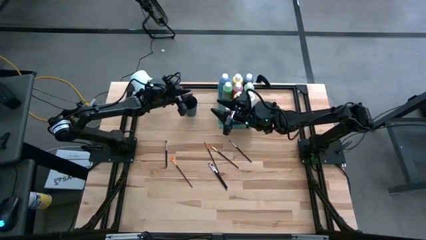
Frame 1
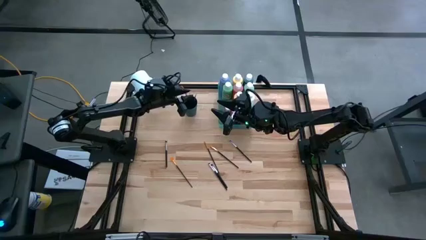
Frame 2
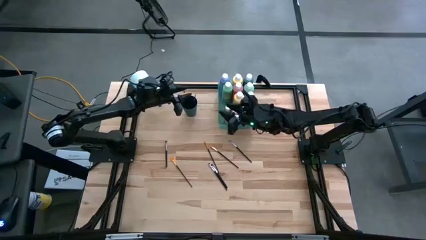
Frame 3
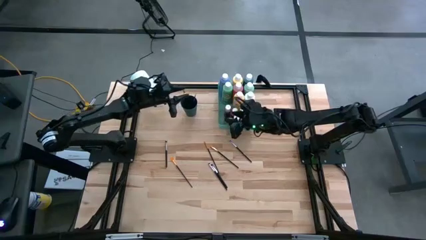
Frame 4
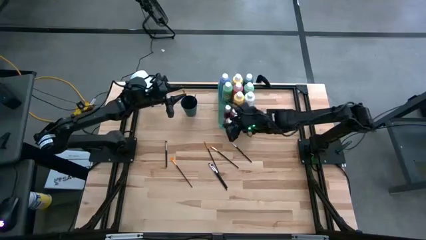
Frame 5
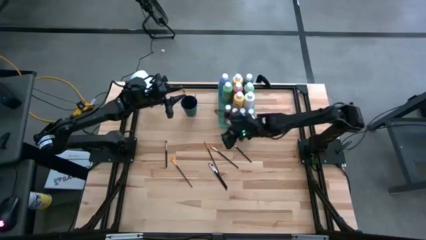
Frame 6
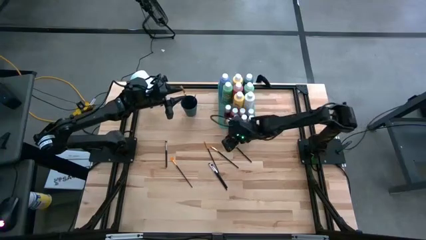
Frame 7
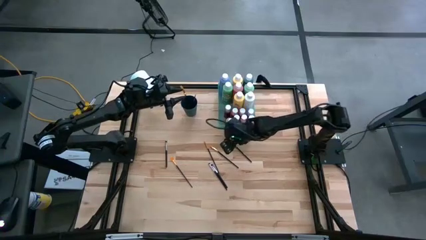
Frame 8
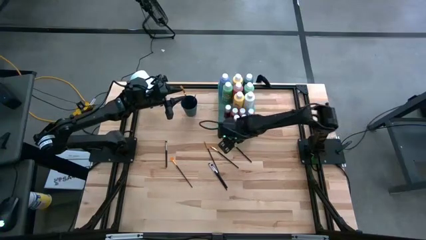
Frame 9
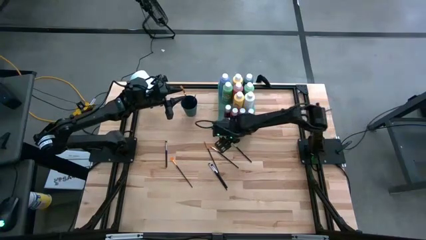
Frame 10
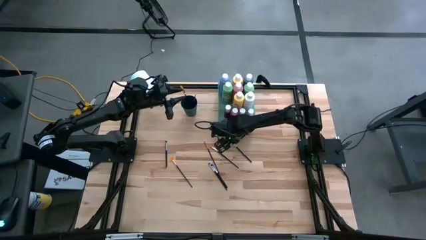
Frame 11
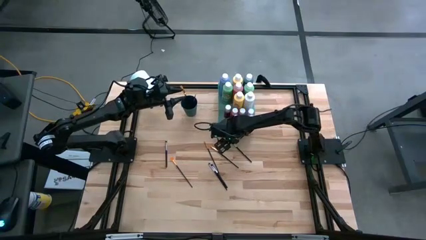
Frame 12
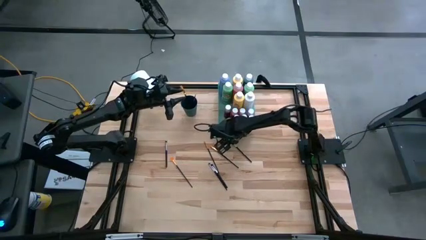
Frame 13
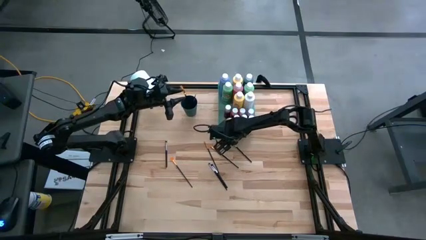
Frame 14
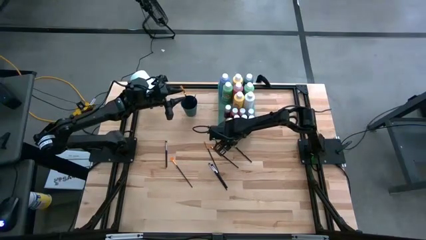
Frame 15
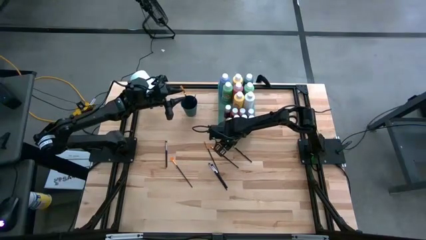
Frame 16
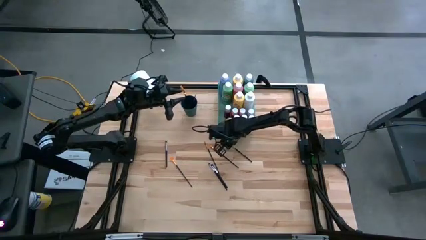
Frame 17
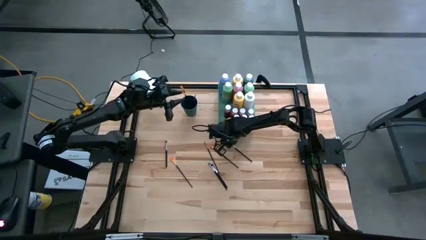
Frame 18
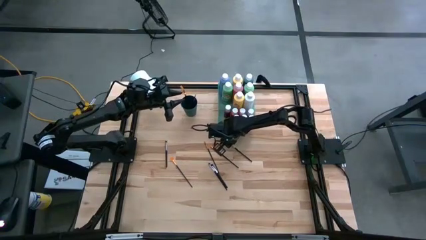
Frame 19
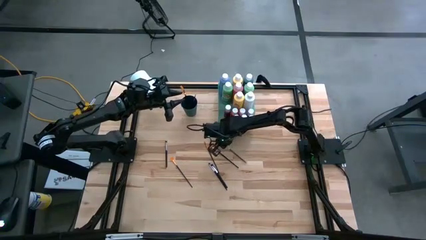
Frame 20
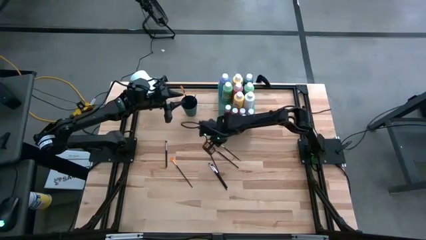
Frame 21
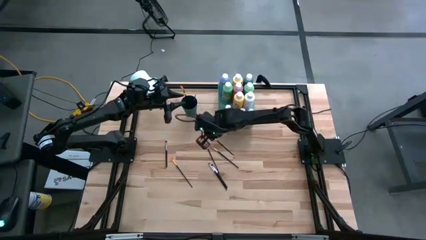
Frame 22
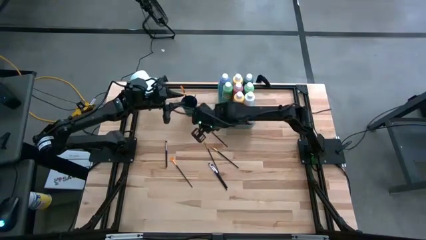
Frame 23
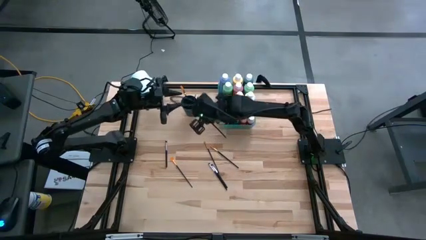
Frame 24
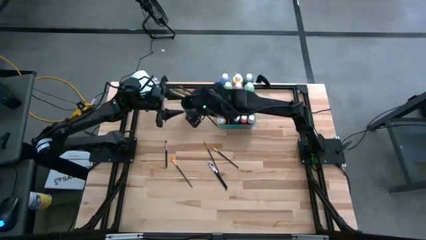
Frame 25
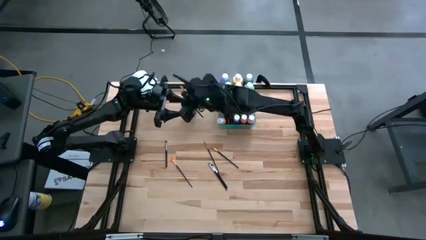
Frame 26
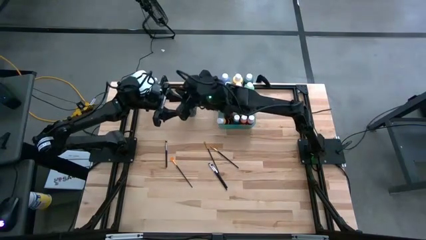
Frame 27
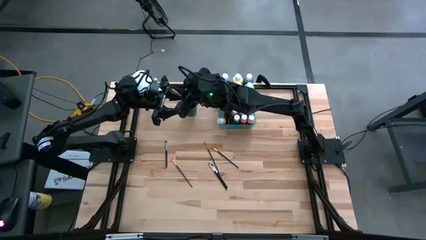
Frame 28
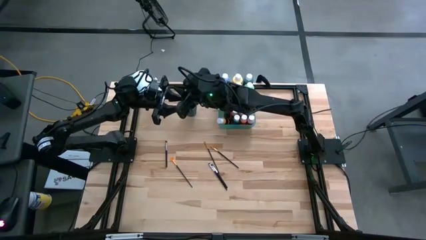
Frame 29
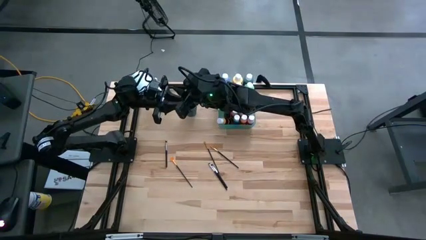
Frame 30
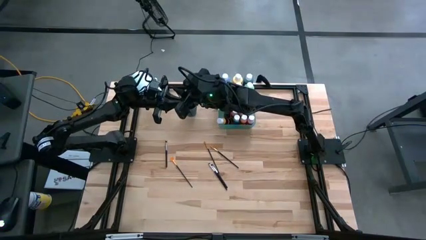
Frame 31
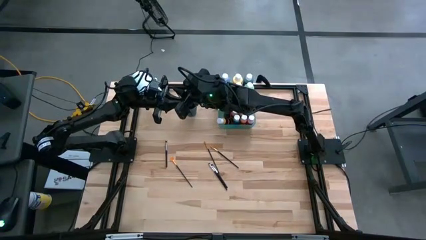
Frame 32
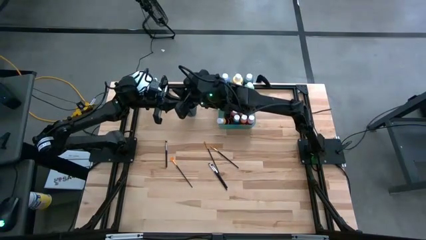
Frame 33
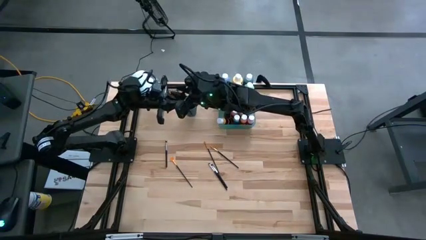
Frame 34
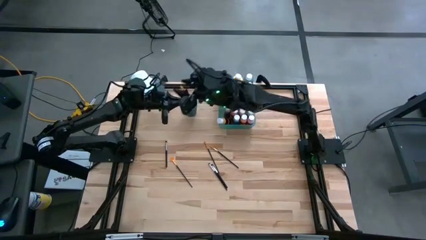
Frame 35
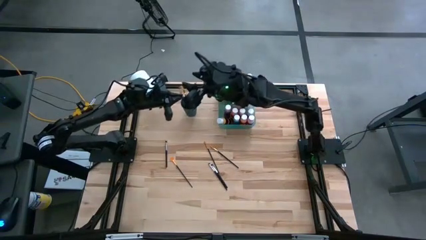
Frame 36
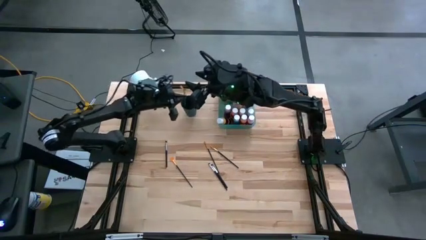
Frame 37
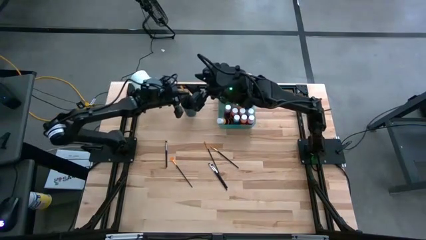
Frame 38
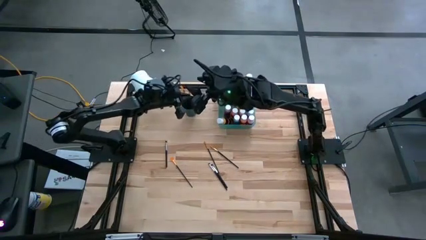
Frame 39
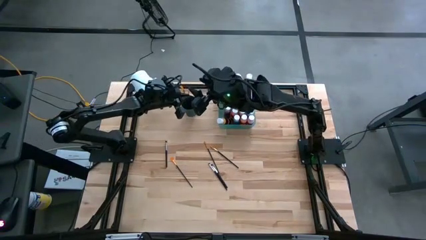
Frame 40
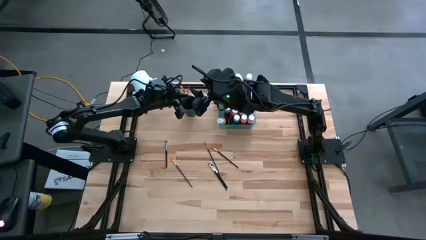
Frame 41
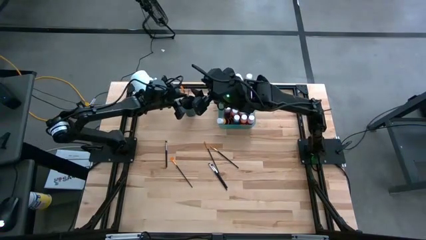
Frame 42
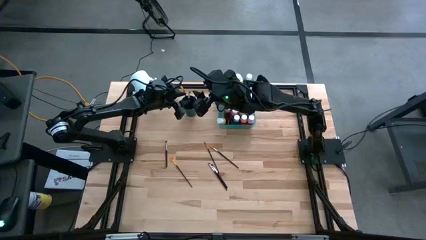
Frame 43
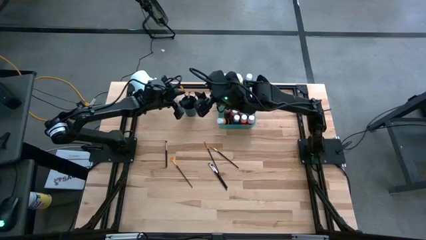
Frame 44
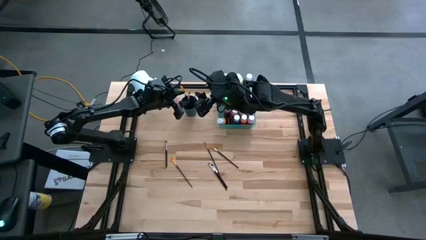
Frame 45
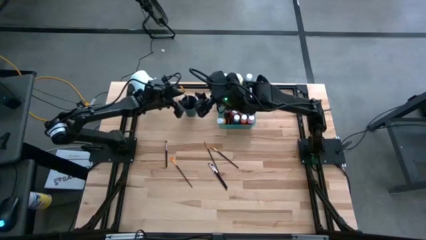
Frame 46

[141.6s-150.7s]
Task: Pick & Place Paint Supplies
Put the black silver paint brush into the black cup

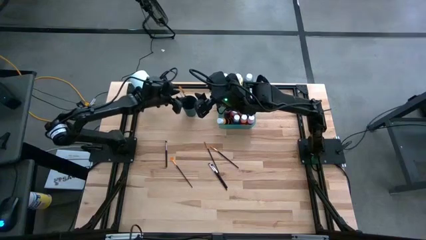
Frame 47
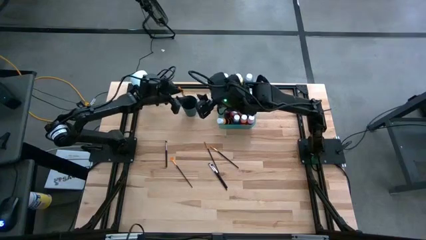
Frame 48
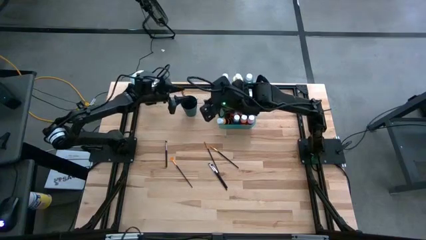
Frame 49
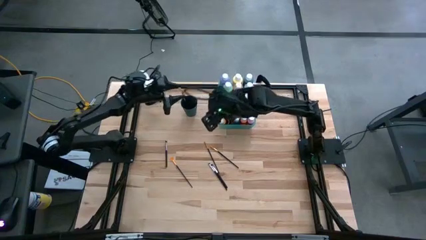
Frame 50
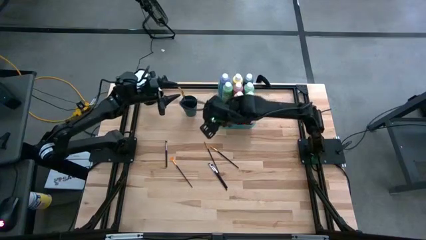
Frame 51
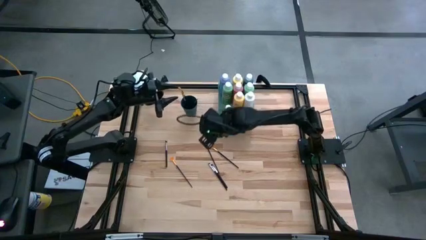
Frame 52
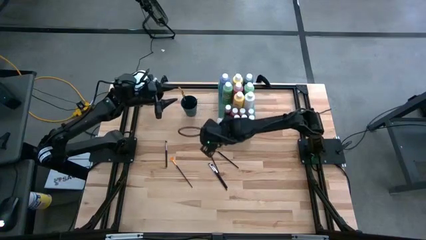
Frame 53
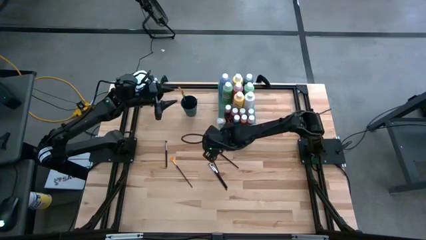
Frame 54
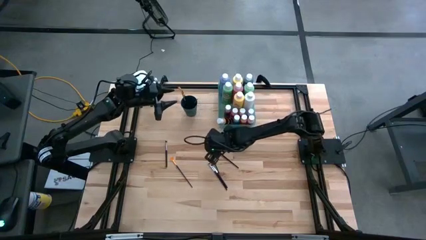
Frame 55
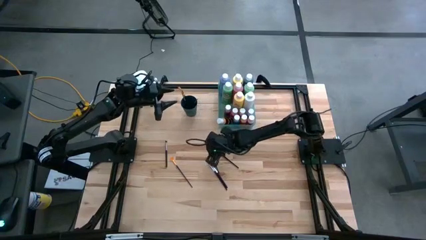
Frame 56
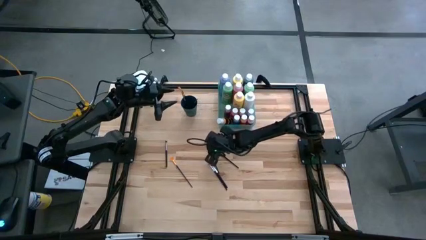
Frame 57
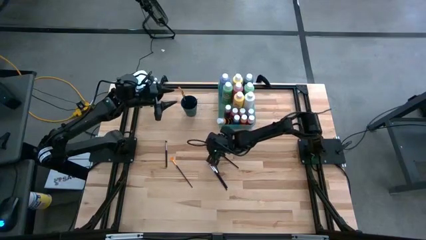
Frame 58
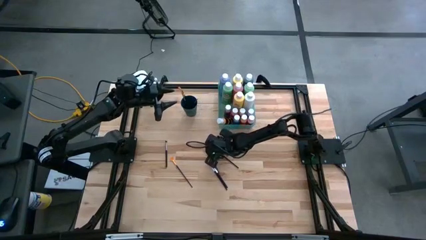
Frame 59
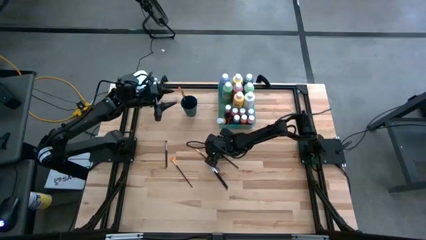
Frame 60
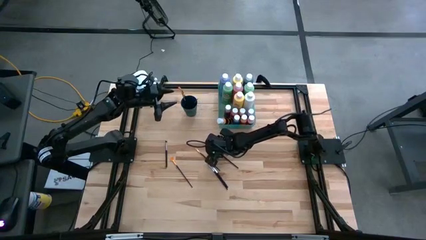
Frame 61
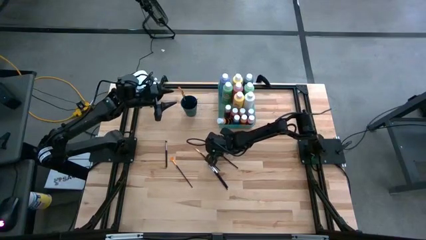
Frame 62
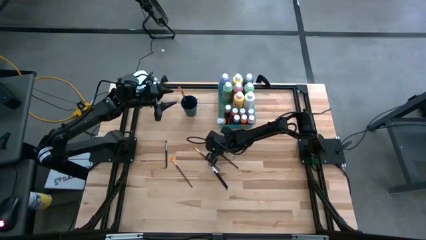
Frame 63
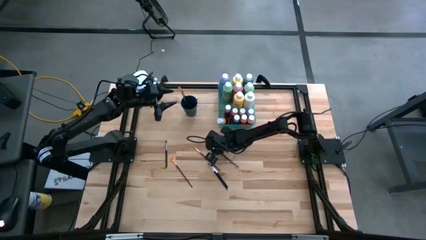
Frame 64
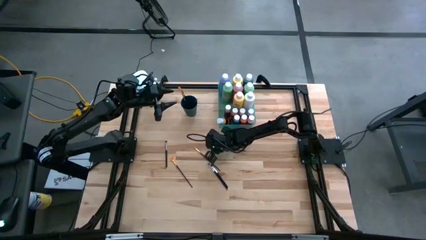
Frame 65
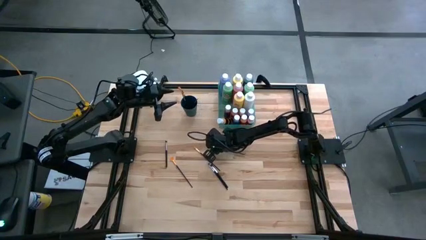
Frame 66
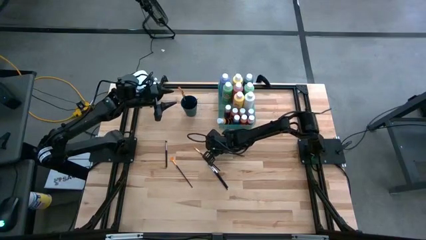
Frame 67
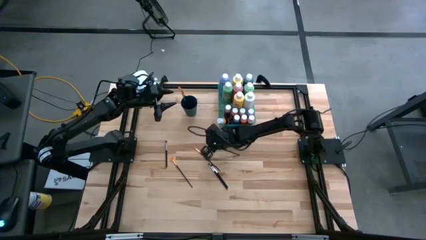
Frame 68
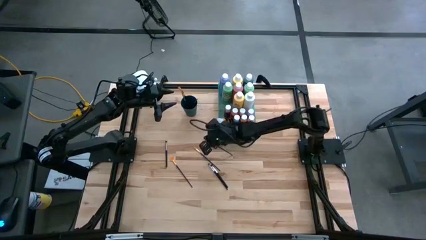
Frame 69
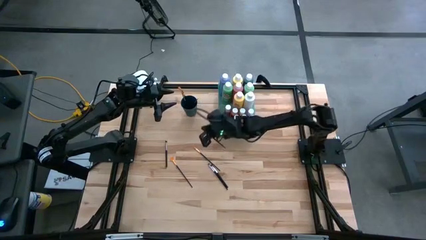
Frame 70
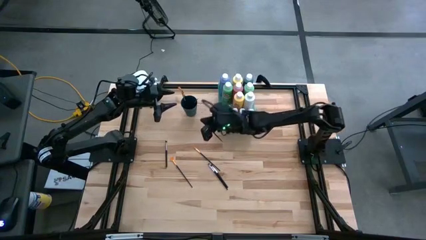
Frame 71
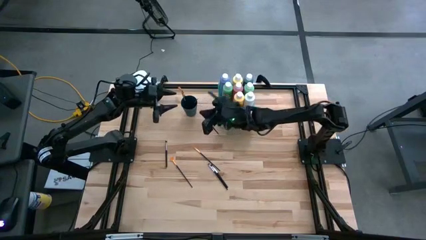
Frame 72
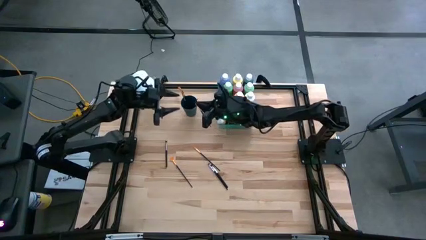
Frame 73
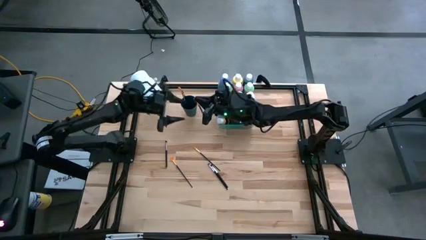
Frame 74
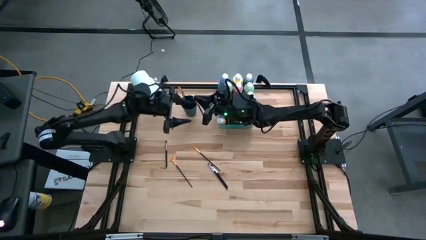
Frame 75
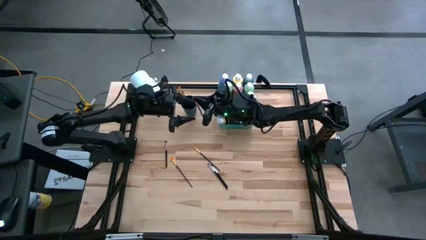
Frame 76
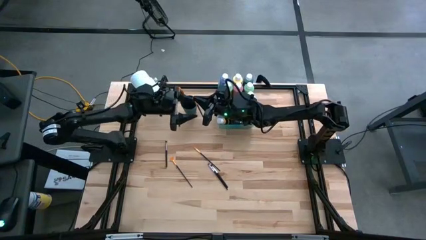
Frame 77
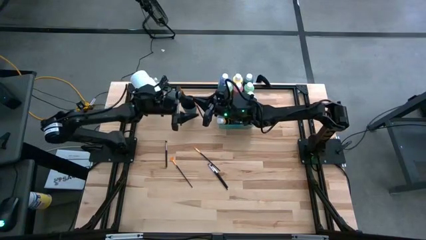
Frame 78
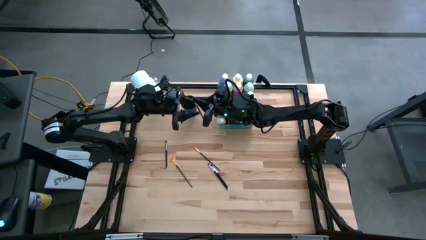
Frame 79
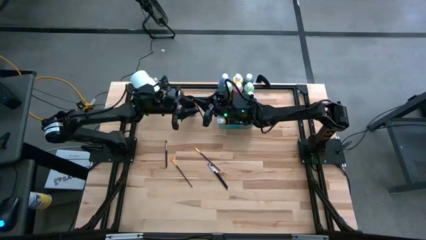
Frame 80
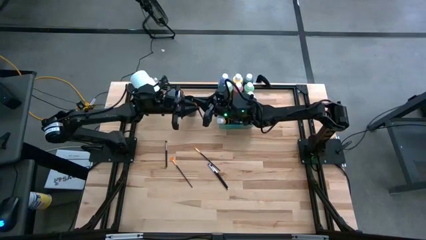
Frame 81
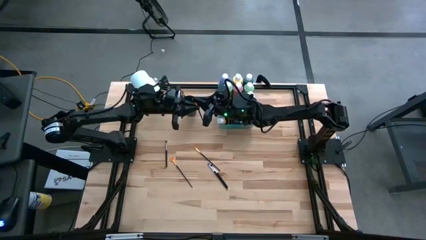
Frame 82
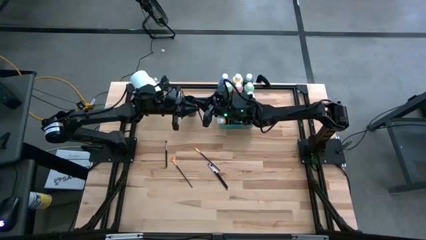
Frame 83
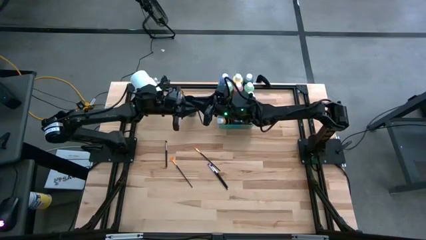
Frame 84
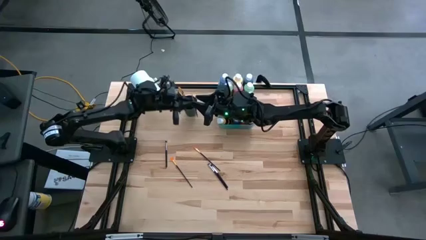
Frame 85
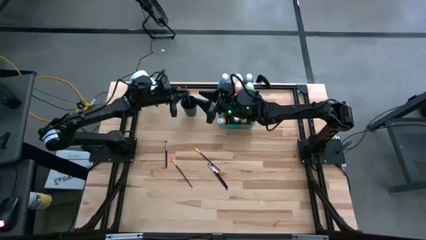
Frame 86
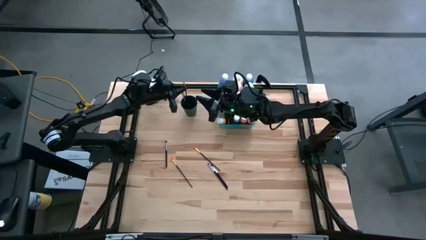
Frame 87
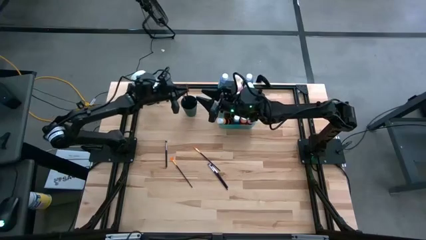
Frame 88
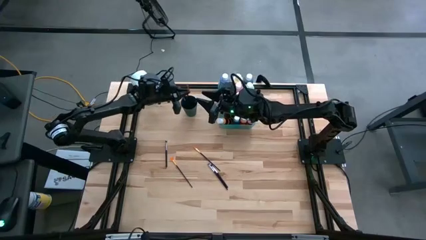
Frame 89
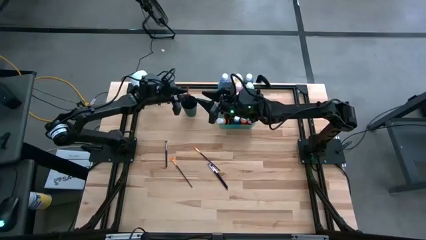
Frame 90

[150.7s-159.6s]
Put the black gold paint brush into the black cup
